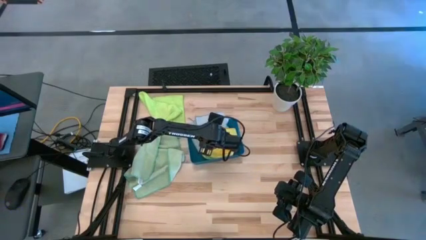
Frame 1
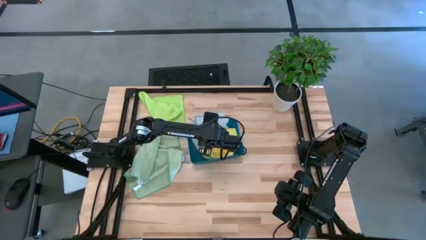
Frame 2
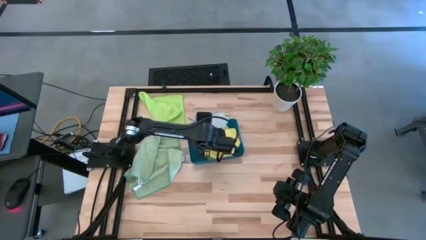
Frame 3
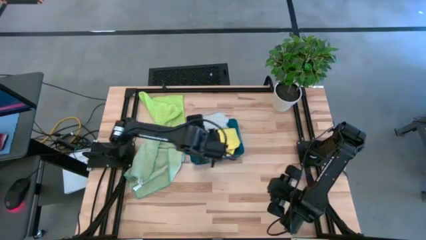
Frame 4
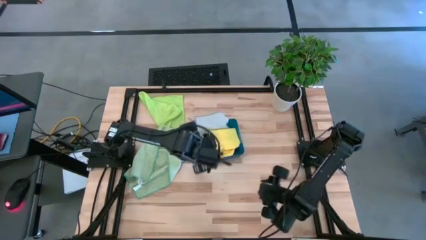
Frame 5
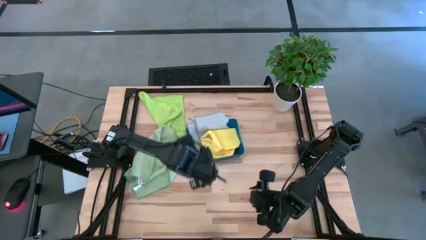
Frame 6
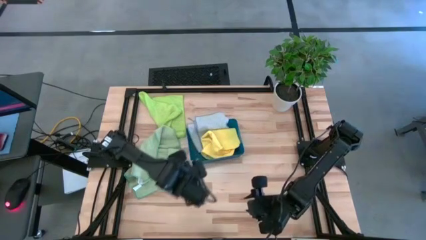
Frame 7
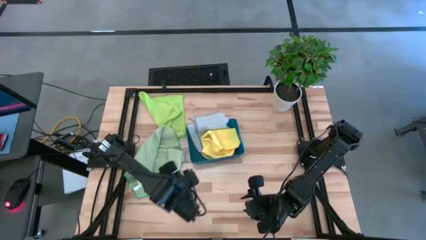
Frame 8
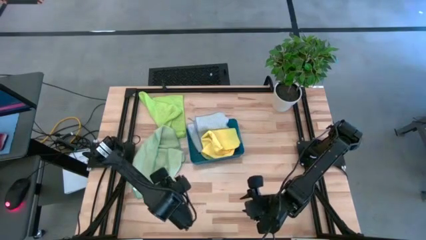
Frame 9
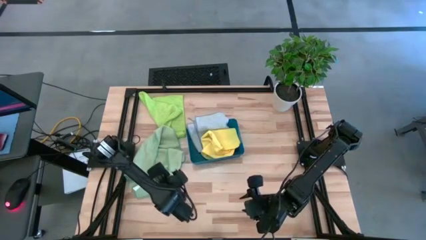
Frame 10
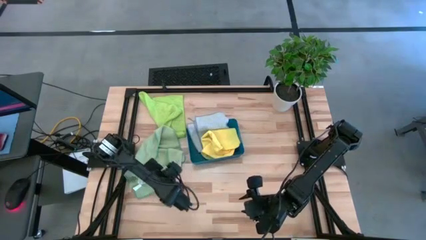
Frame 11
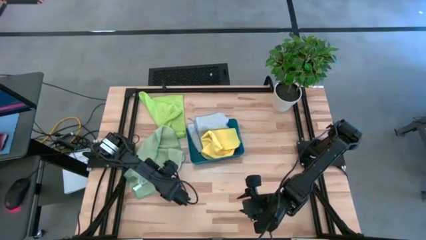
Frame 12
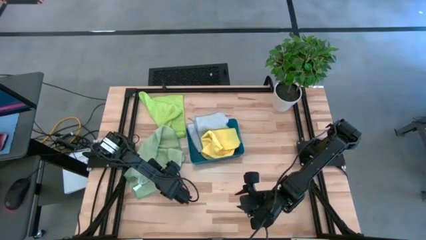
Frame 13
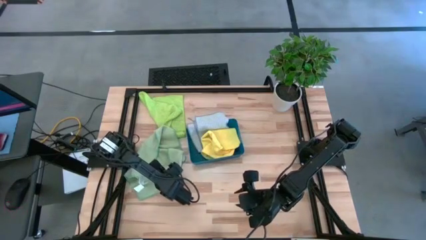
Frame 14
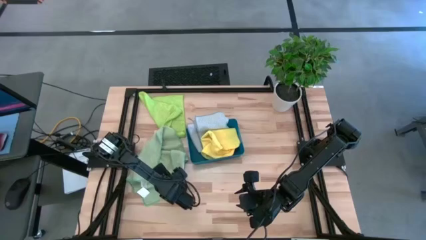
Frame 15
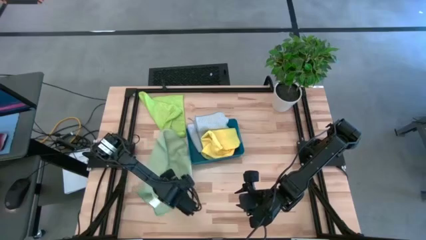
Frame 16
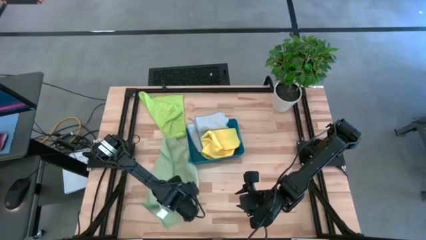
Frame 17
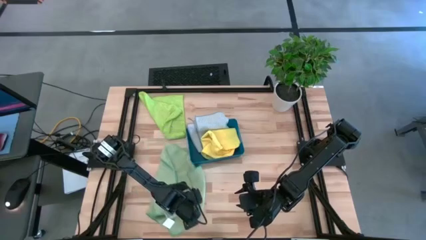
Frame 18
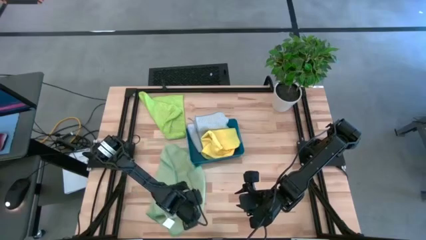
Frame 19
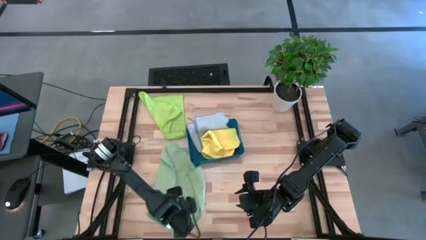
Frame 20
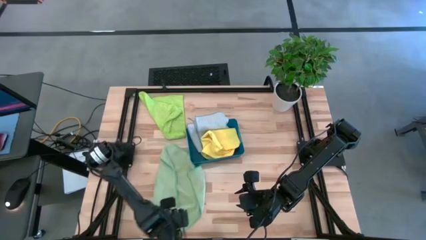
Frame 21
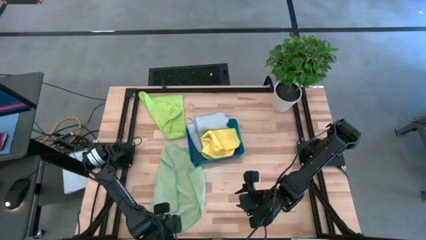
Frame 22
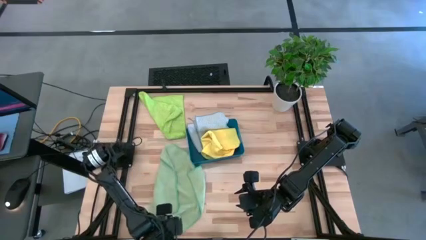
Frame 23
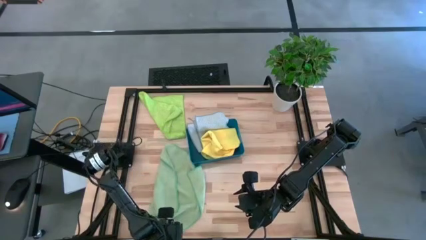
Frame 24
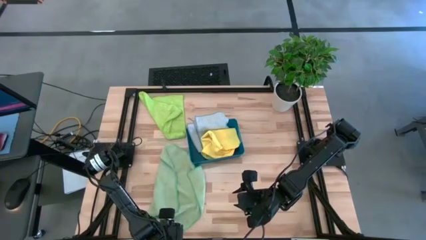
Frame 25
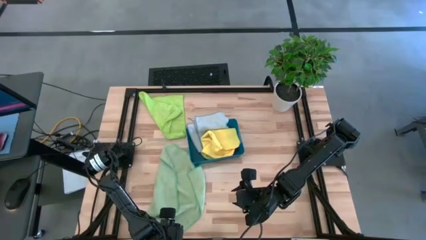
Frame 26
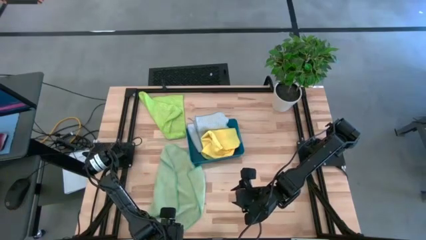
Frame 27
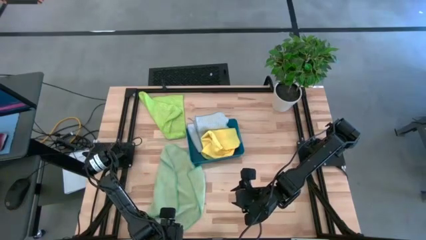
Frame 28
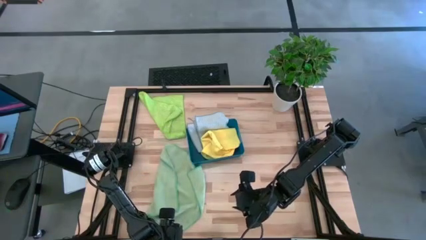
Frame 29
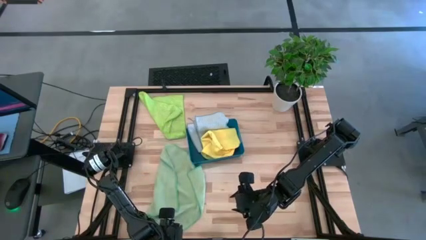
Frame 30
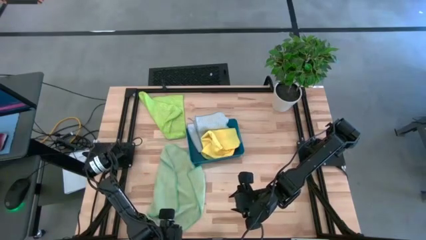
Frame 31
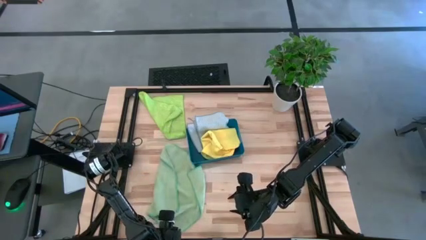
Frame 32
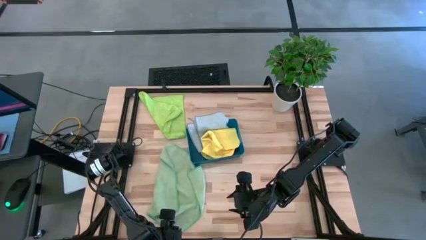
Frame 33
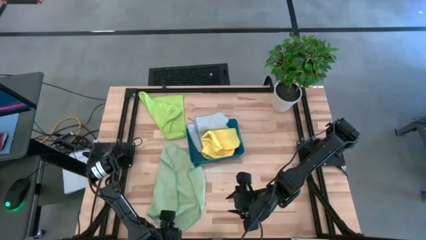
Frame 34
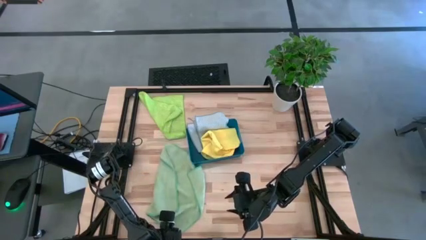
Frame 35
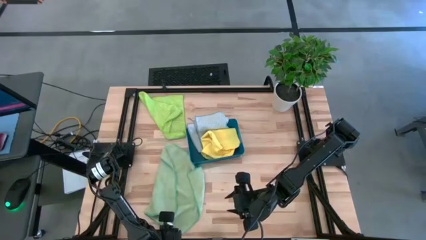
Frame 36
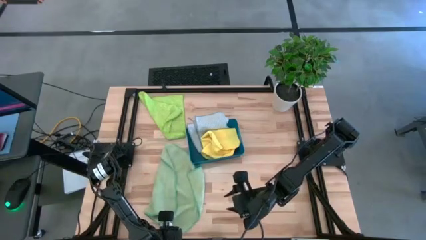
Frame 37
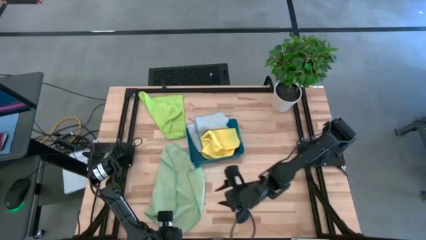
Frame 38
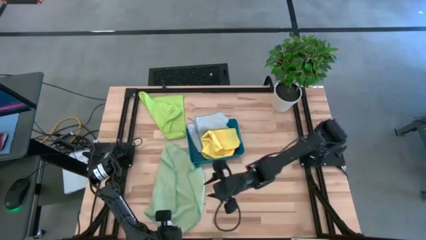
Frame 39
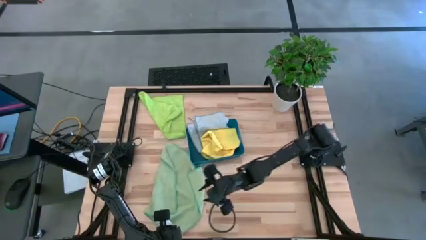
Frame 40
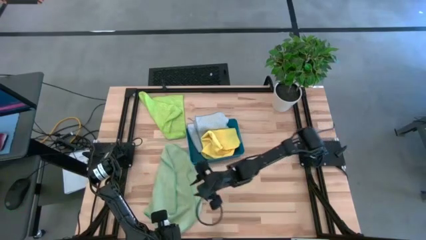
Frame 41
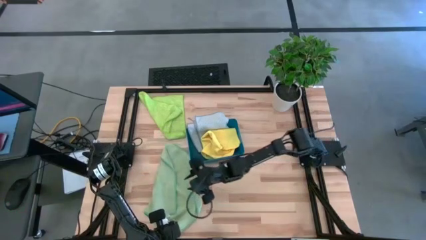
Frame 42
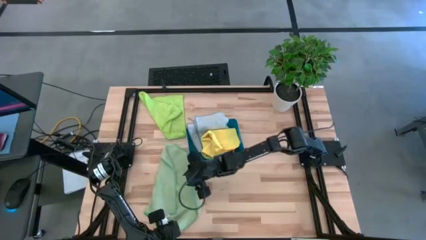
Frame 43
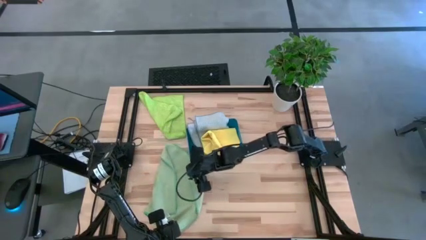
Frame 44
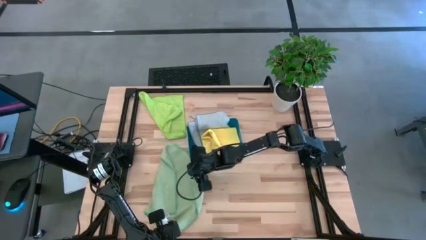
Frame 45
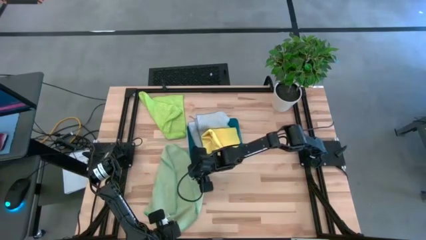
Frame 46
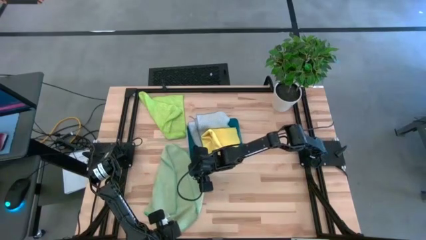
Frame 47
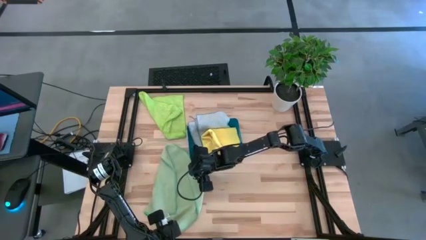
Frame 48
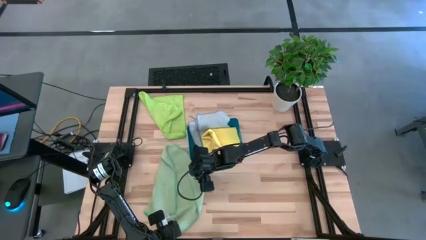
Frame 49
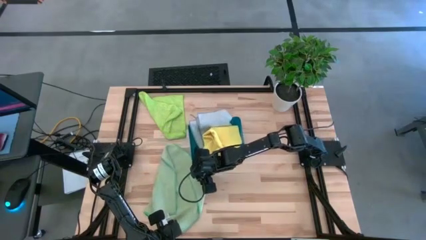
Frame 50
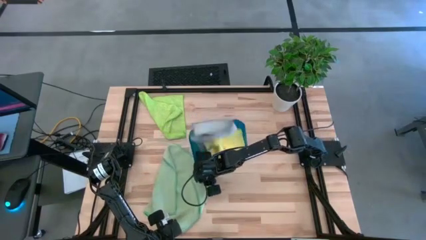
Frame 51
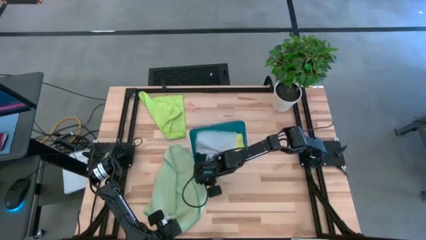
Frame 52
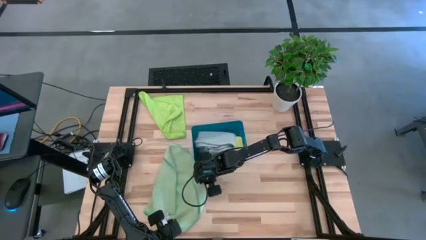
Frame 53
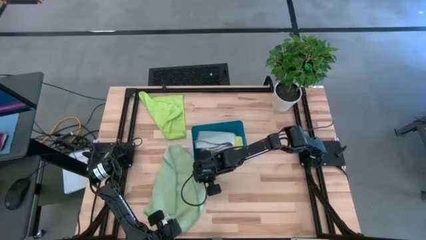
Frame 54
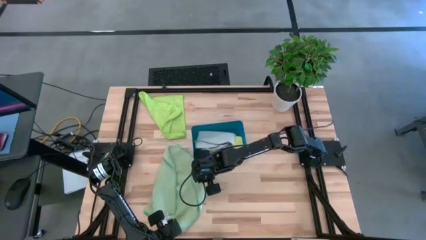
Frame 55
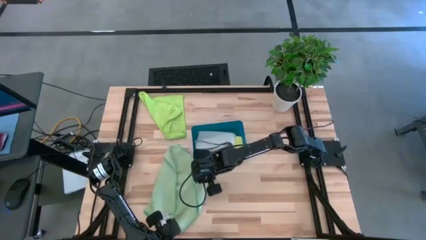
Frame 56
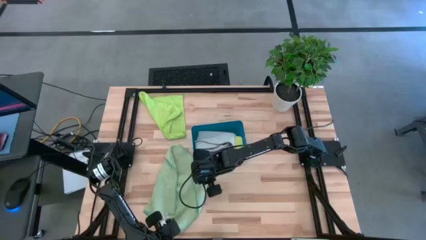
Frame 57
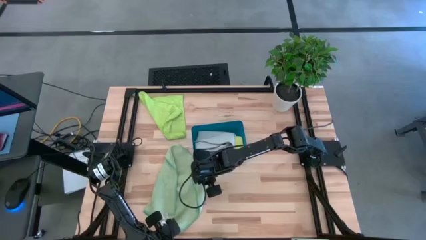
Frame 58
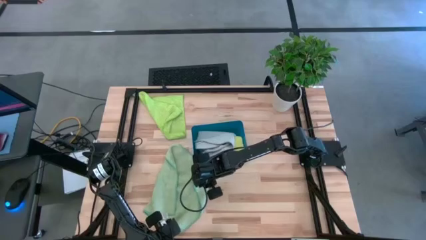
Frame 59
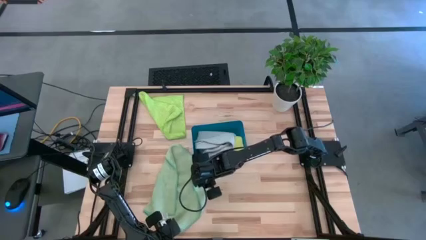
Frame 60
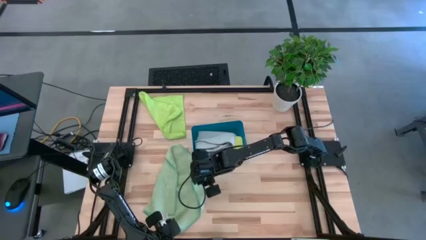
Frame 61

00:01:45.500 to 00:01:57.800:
Task: Fold microfiber towels
Fold the light green microfiber towel

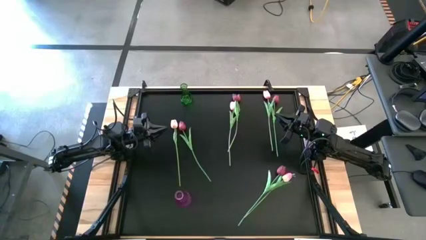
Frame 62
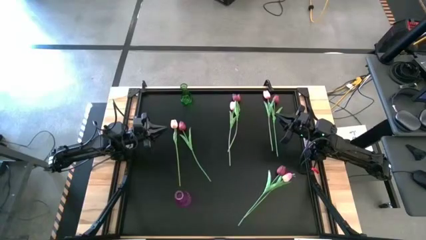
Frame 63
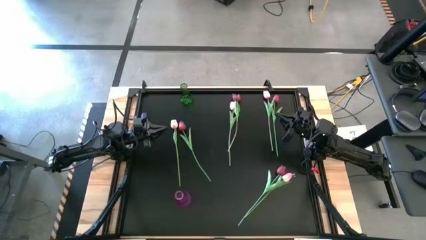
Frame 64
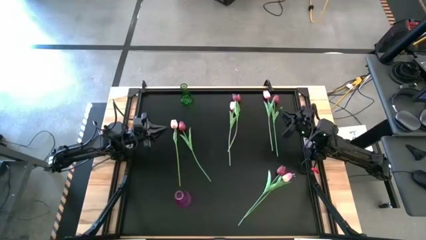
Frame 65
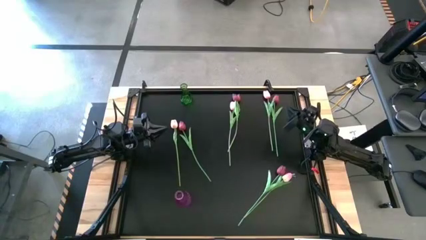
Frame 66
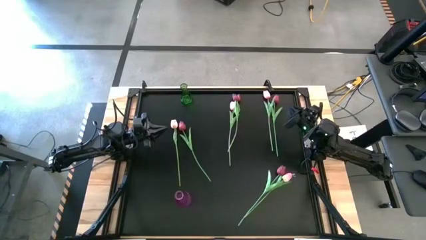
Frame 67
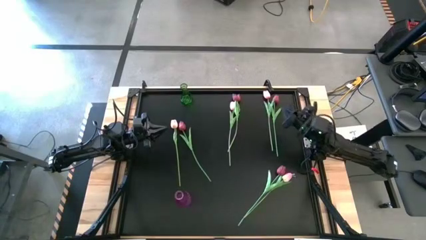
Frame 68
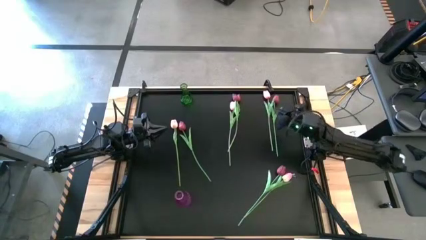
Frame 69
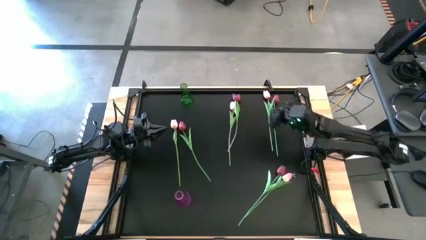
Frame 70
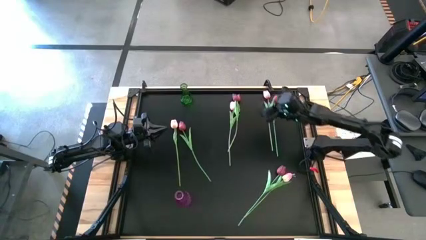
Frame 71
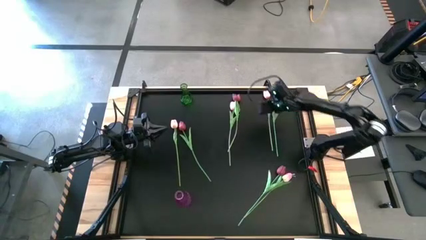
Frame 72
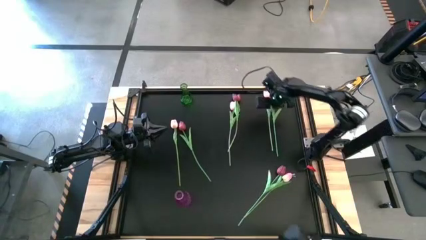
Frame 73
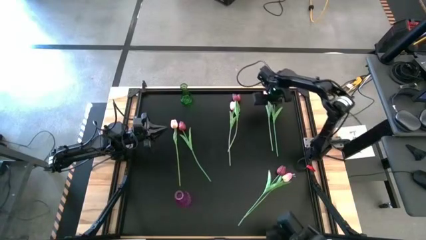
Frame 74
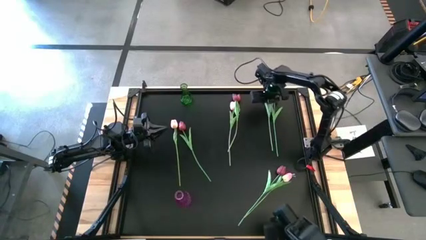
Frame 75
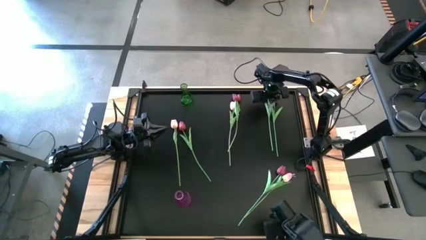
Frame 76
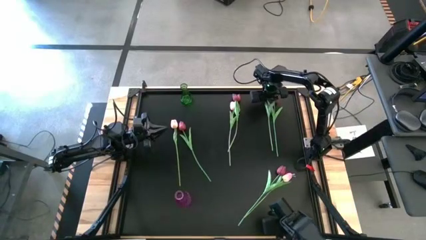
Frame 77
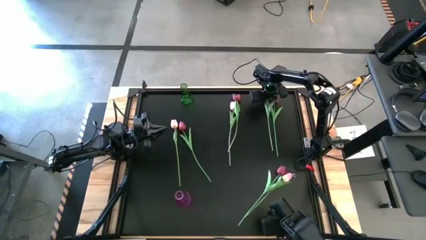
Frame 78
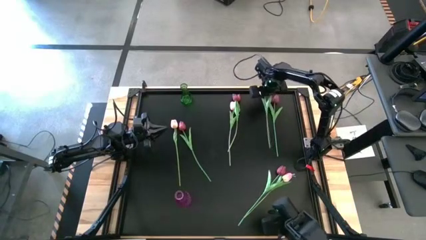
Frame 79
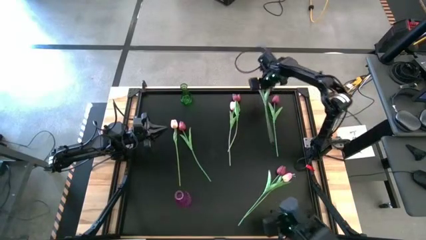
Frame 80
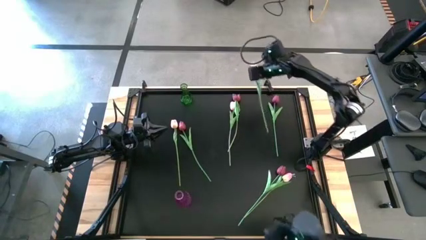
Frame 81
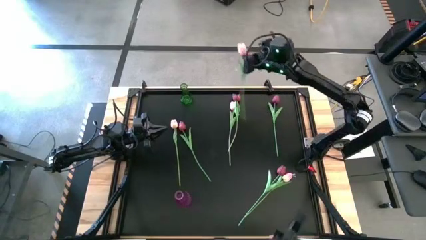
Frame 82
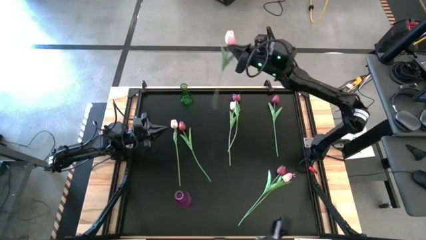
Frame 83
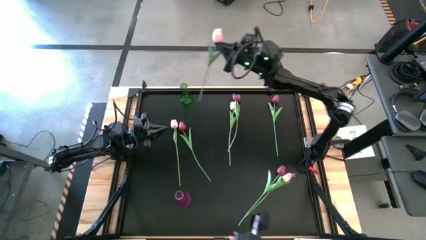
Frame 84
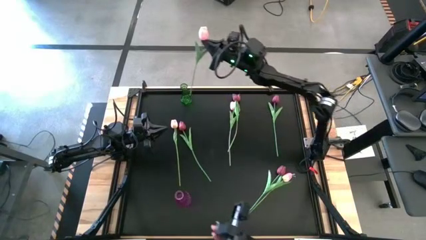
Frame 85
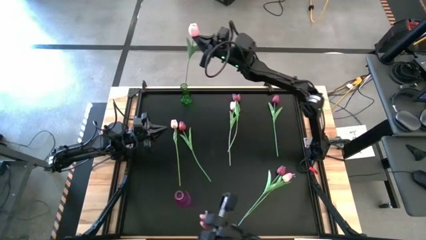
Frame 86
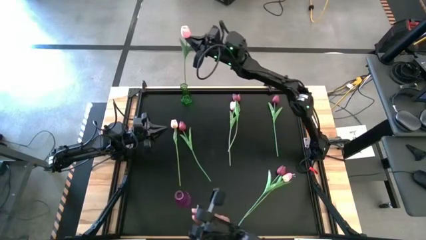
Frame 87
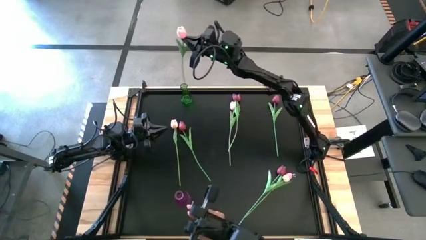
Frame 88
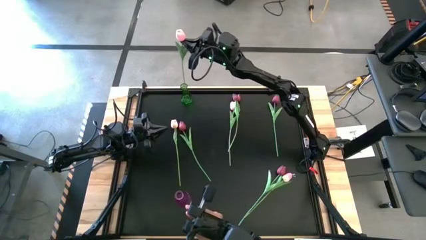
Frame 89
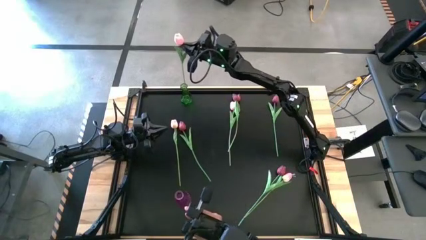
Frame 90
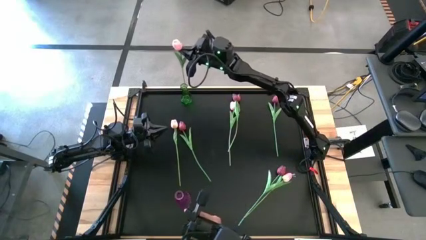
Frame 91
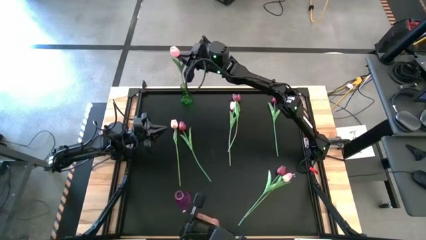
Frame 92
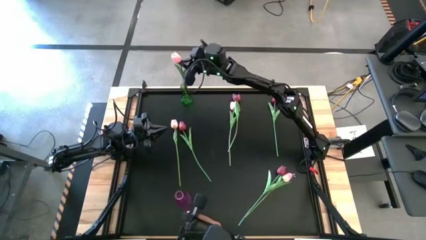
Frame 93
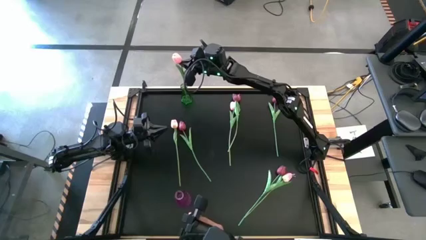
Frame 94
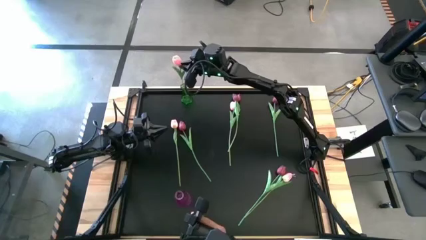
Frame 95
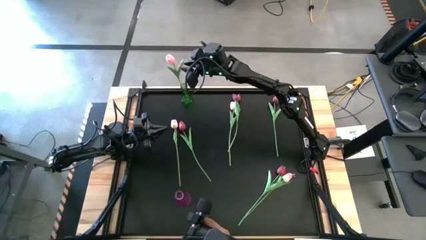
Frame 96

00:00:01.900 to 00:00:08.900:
Task: Sort flowers into vase by color
Put the top right pink tulip into the green vase
